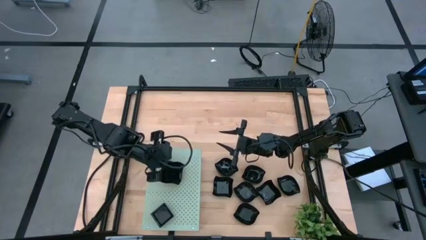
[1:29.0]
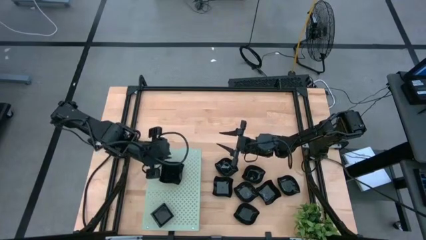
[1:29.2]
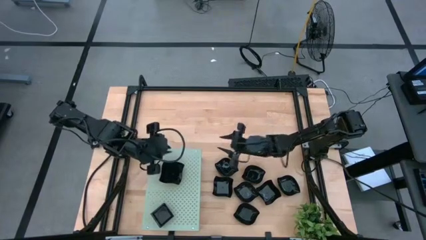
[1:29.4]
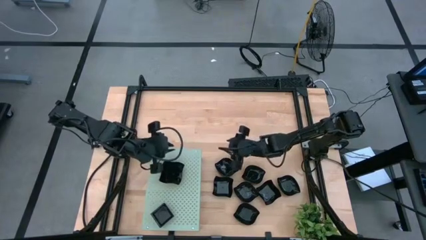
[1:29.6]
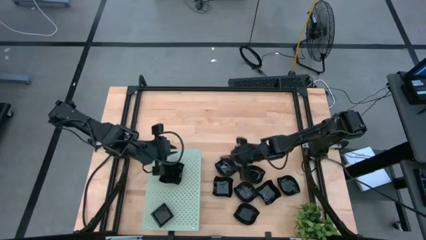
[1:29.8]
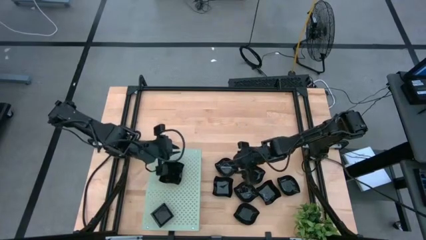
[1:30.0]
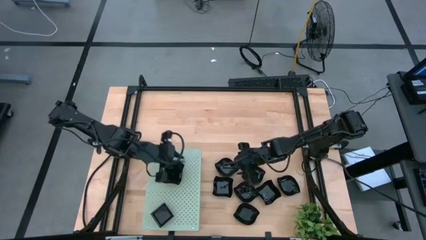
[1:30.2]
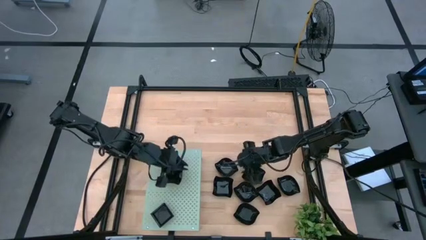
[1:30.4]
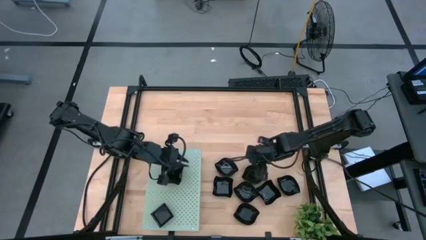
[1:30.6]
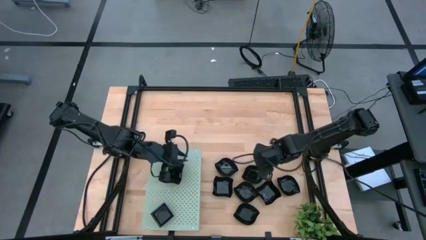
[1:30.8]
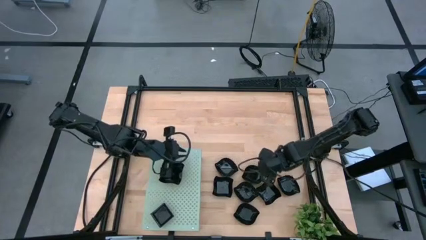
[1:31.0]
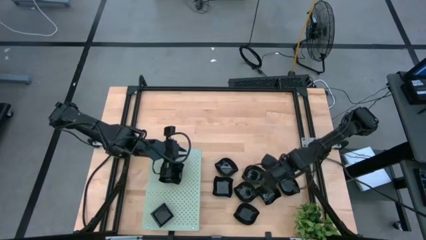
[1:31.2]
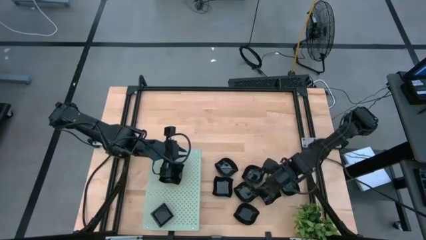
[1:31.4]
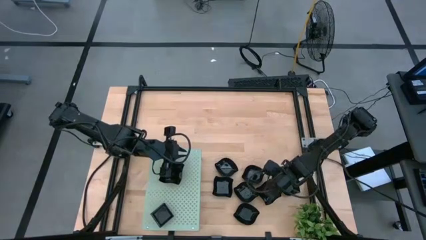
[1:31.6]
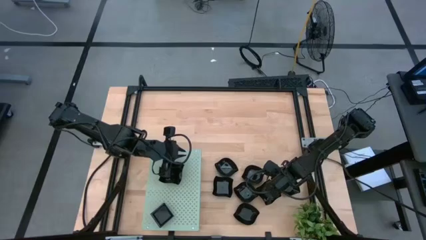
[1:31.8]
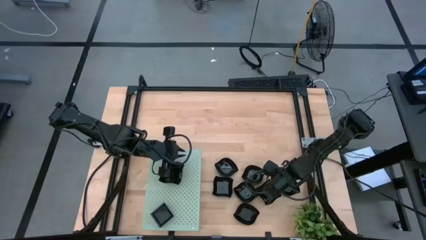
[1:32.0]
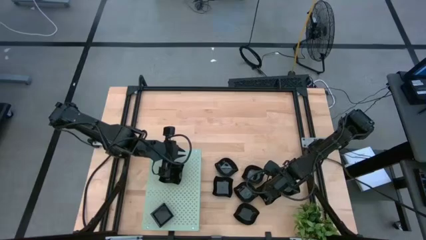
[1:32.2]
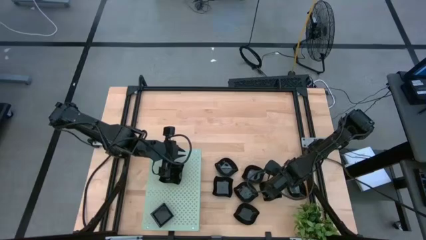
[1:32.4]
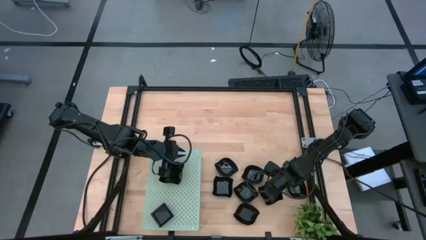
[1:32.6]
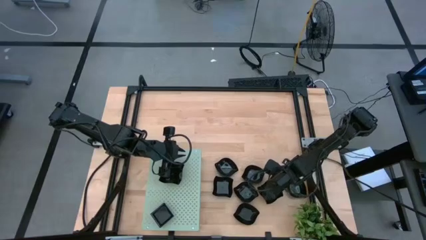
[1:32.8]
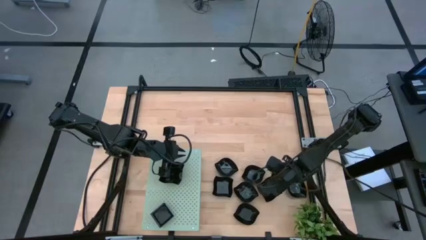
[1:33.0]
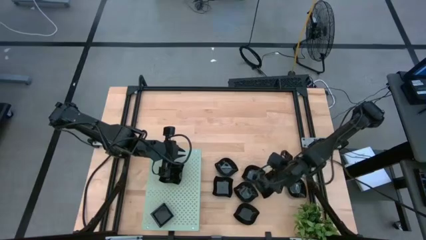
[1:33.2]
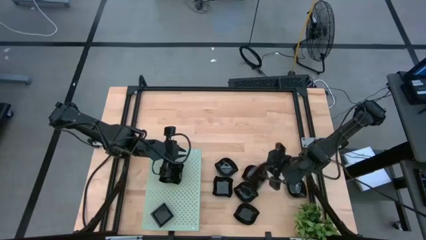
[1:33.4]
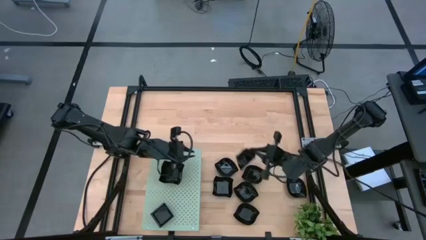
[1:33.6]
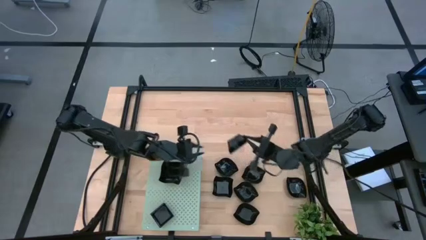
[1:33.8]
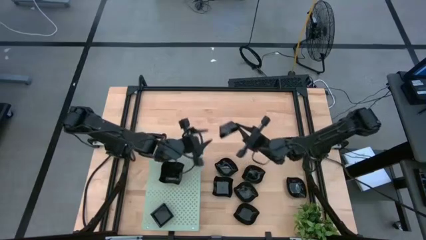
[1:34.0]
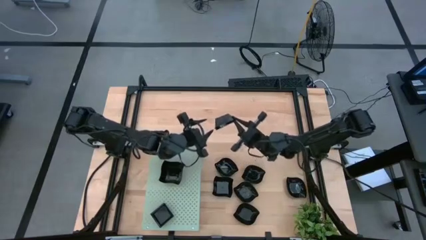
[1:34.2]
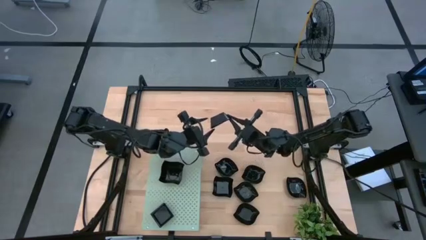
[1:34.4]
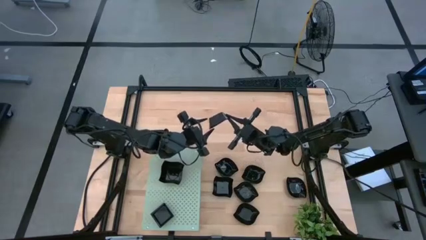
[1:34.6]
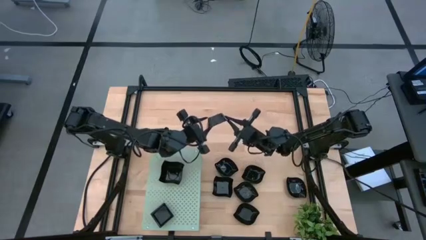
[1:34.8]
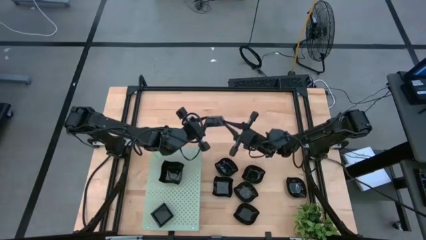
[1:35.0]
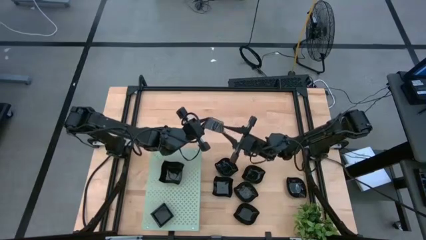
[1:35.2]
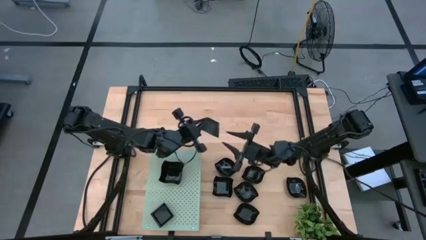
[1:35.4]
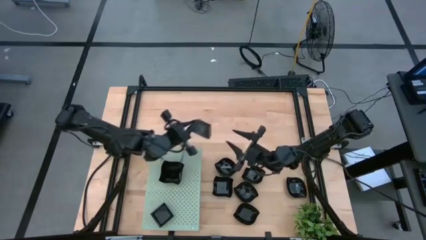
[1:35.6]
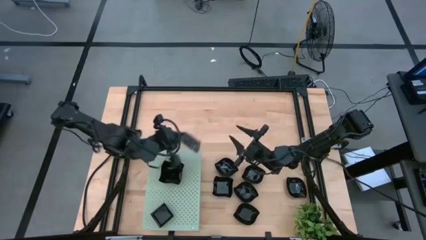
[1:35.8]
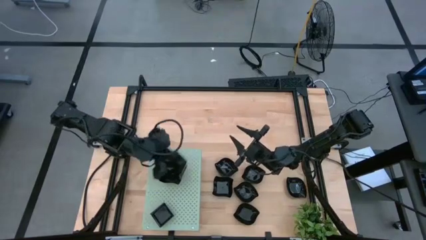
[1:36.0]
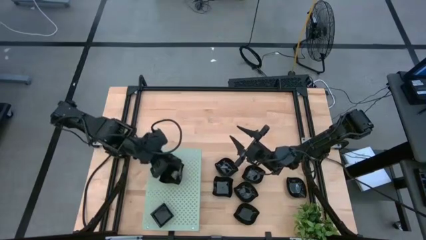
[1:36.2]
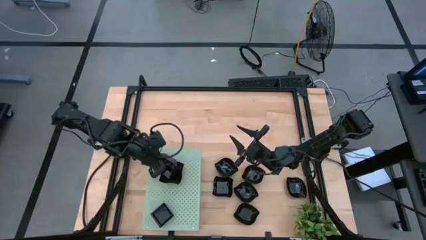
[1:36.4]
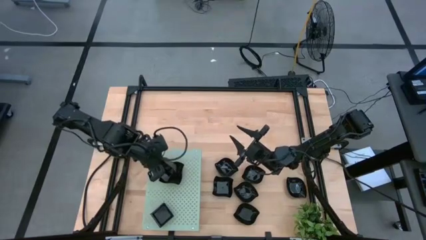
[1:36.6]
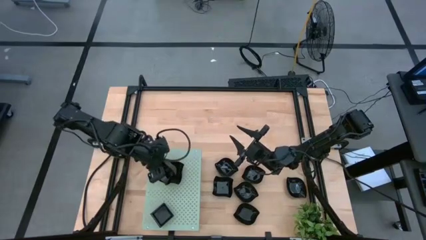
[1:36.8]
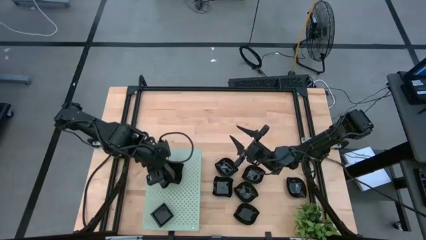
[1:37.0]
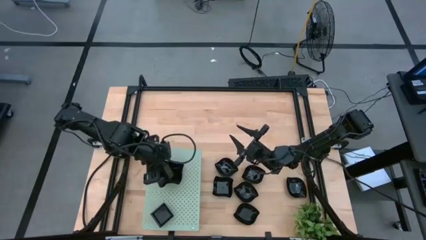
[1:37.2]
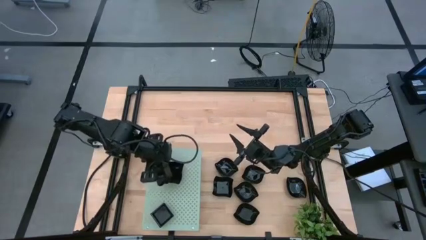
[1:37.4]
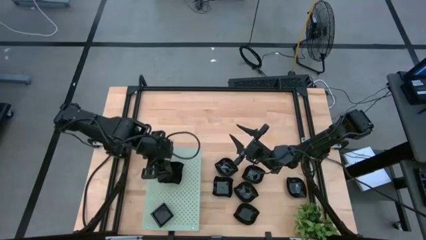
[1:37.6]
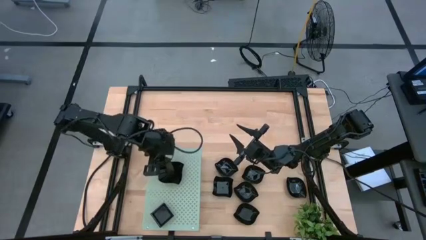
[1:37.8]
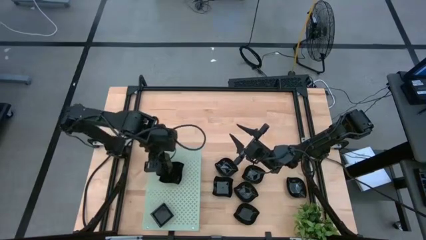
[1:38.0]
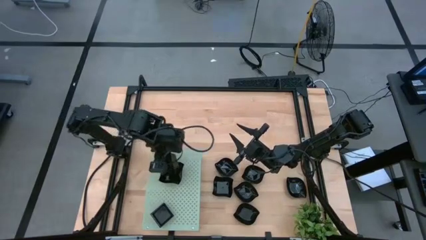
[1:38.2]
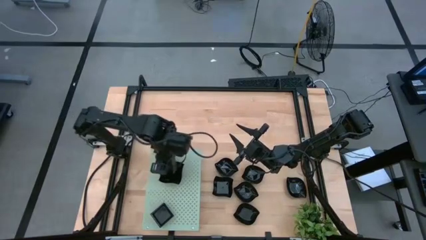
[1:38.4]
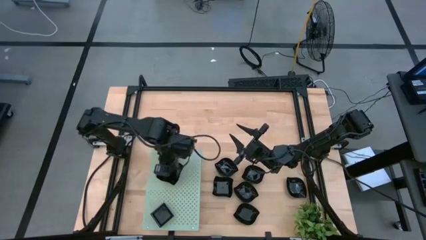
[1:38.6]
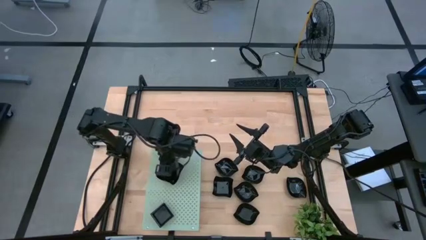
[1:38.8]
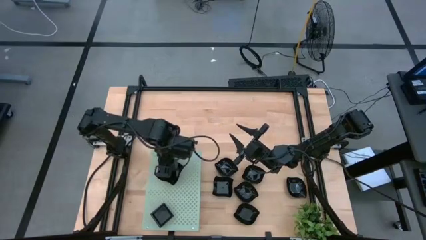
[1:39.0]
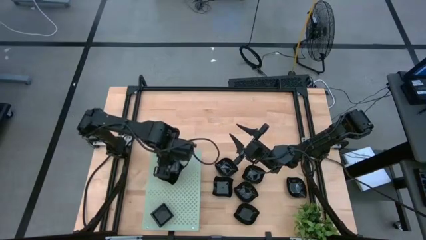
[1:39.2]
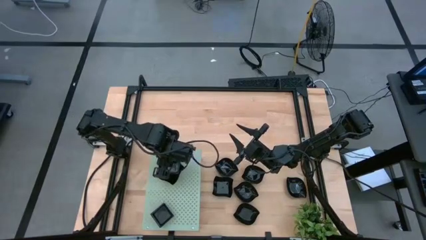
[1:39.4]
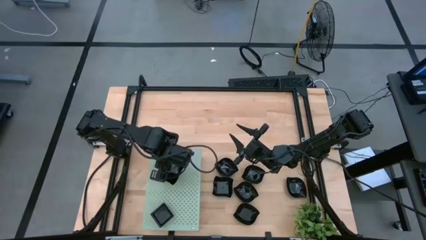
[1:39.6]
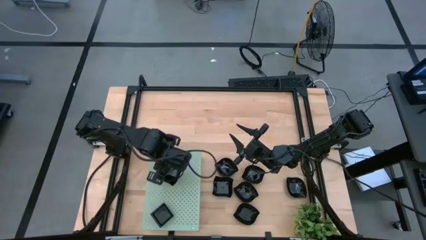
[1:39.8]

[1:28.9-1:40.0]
Task: Pick & Place Mini shaped plates
Stack the distorted square plate on top of the other distorted square plates on the shelf

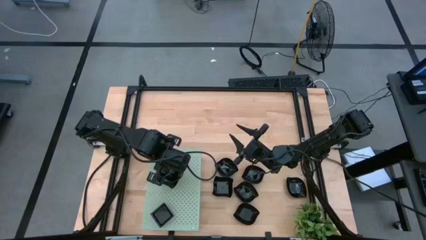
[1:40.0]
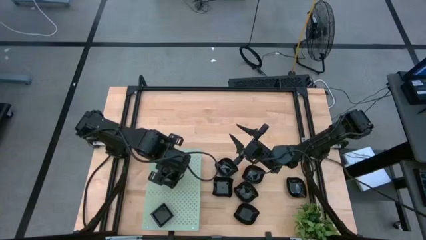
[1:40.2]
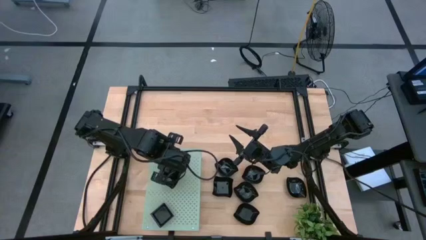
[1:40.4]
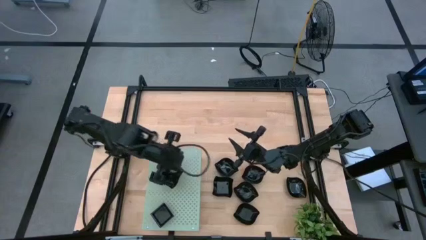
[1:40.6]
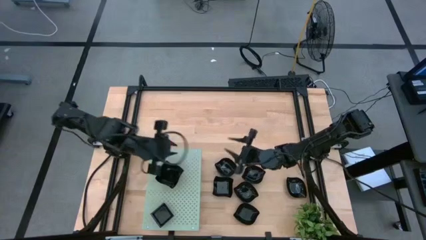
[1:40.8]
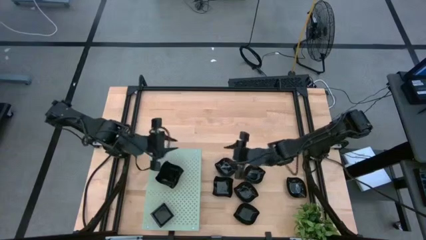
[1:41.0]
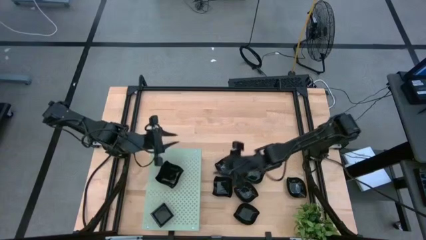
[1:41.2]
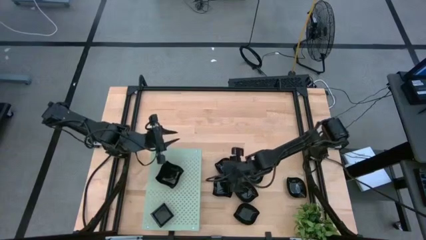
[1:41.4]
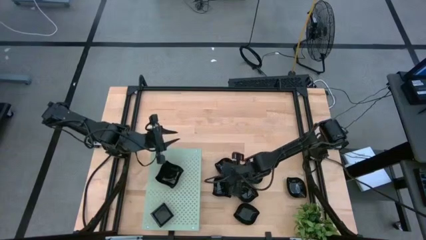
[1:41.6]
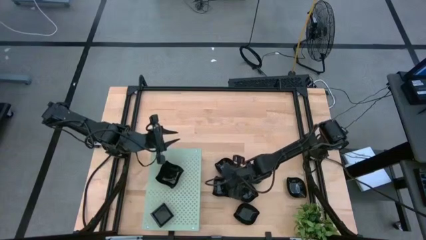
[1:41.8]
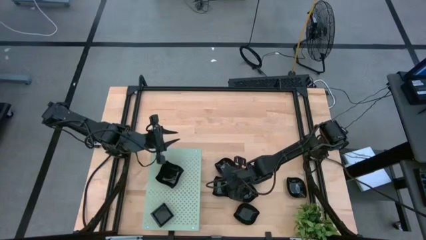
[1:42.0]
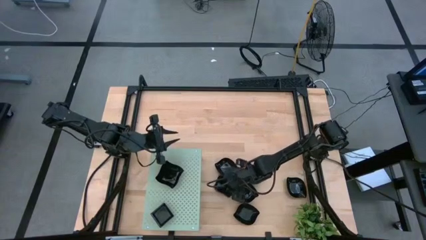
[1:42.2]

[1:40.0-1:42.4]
Stack the distorted square plate on top of the other distorted square plates on the shelf
